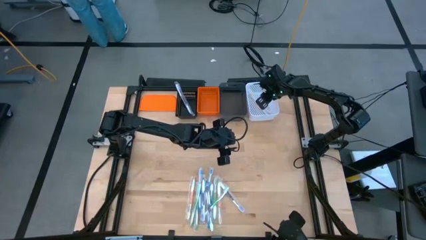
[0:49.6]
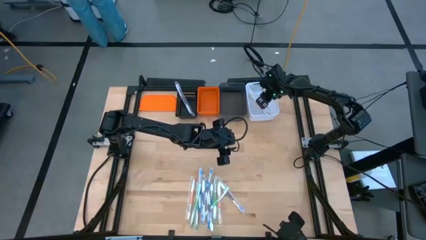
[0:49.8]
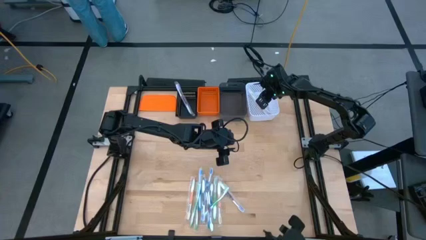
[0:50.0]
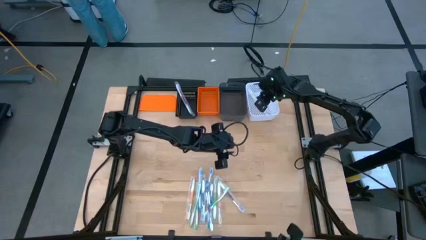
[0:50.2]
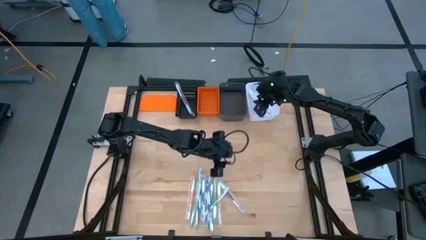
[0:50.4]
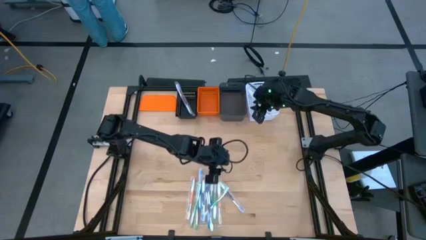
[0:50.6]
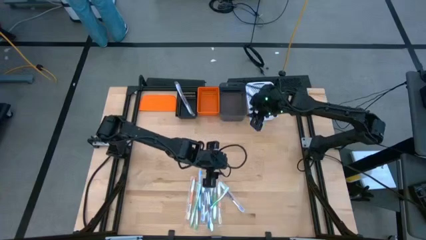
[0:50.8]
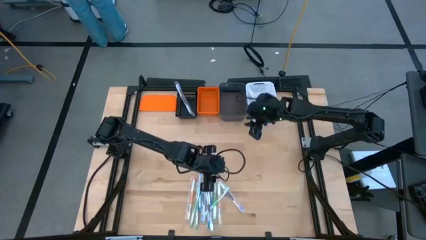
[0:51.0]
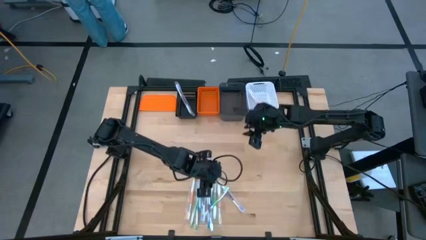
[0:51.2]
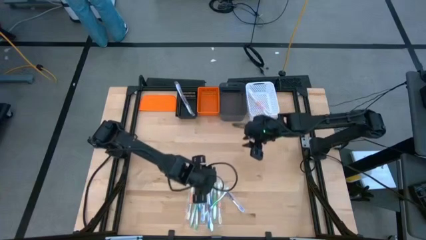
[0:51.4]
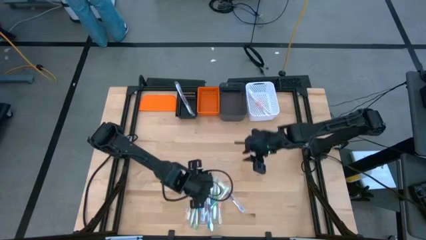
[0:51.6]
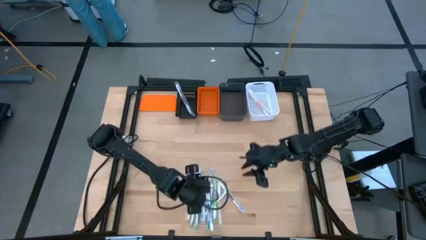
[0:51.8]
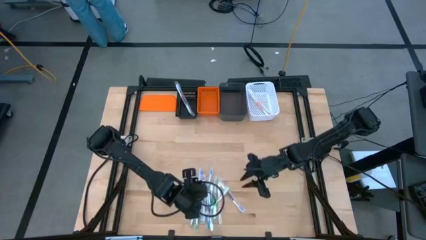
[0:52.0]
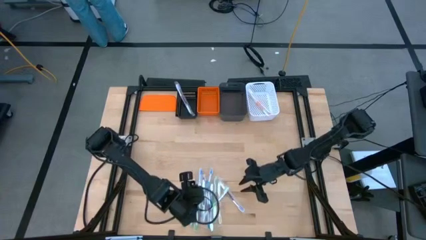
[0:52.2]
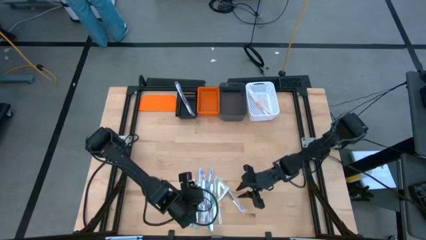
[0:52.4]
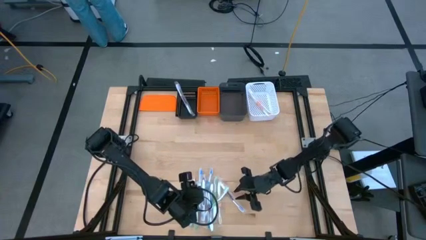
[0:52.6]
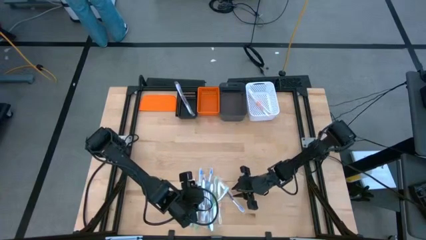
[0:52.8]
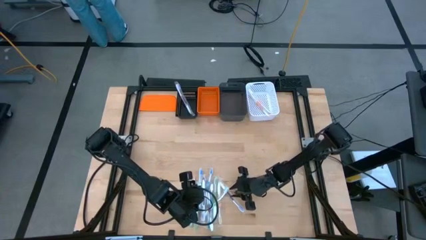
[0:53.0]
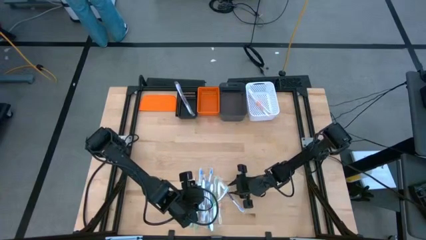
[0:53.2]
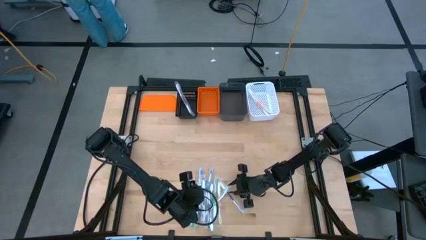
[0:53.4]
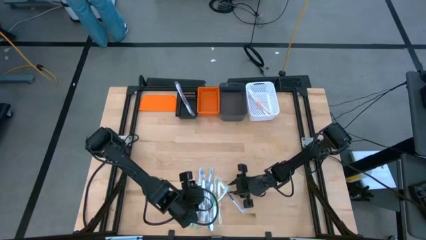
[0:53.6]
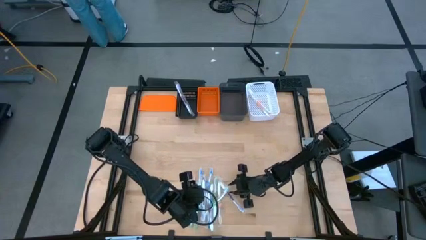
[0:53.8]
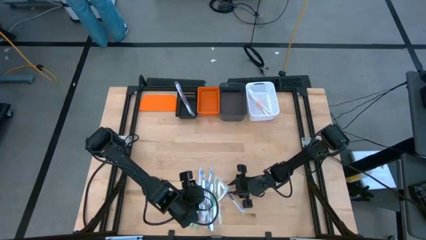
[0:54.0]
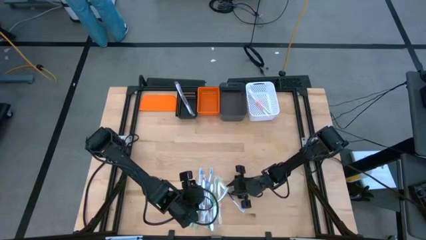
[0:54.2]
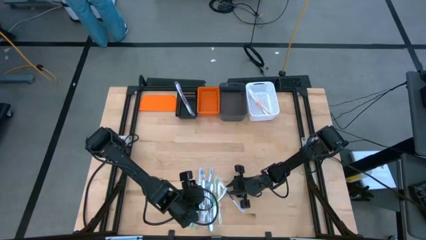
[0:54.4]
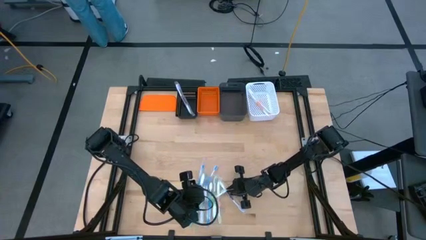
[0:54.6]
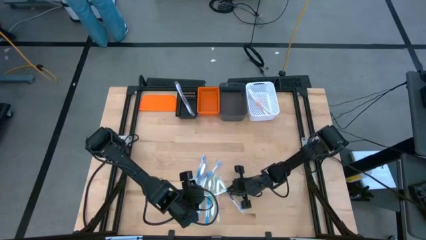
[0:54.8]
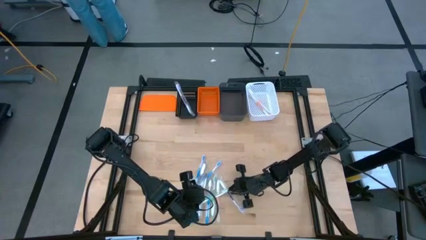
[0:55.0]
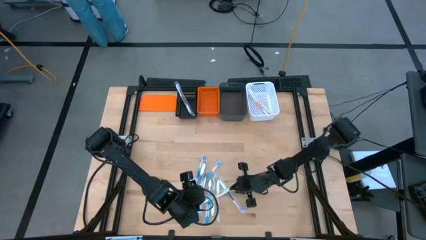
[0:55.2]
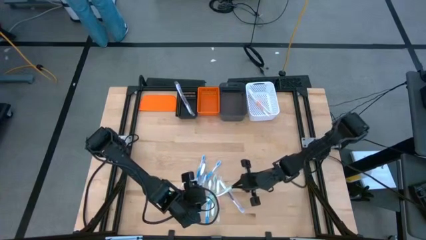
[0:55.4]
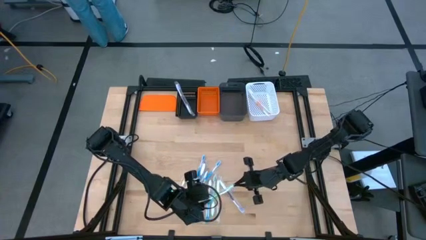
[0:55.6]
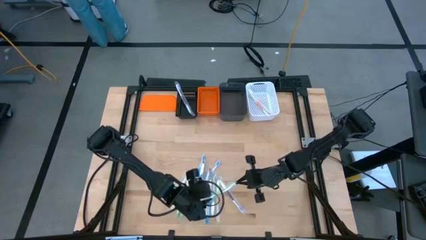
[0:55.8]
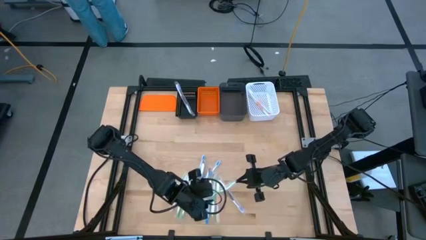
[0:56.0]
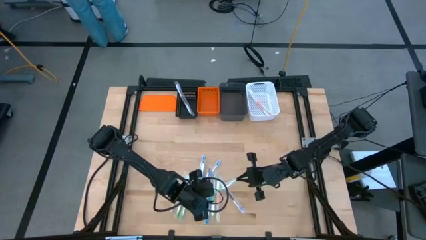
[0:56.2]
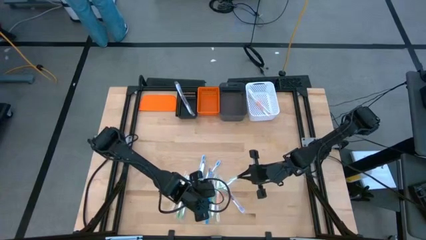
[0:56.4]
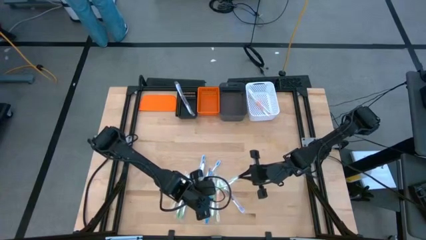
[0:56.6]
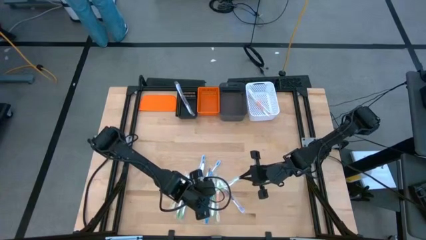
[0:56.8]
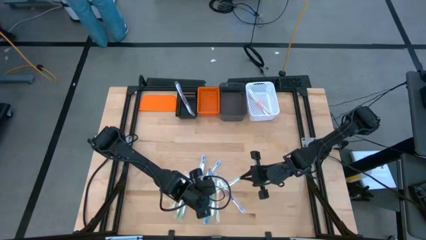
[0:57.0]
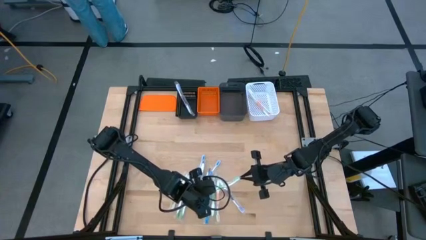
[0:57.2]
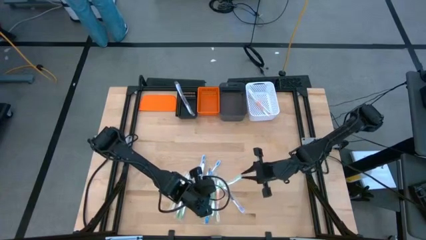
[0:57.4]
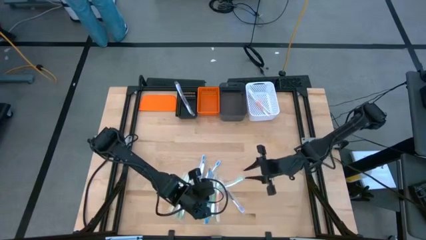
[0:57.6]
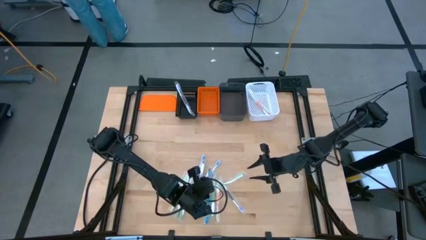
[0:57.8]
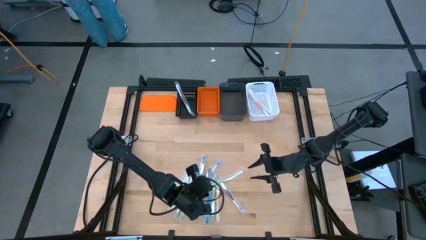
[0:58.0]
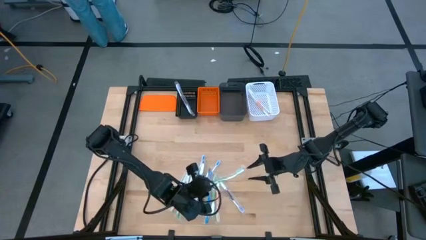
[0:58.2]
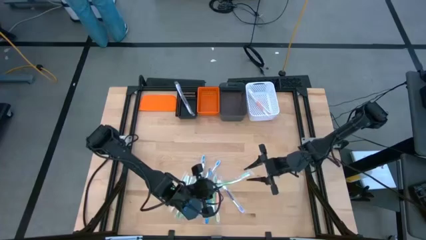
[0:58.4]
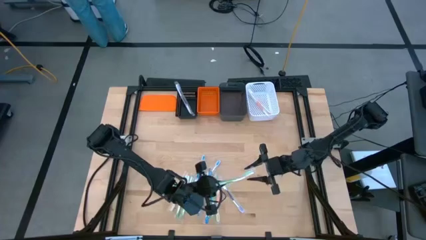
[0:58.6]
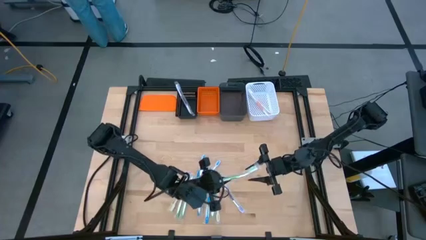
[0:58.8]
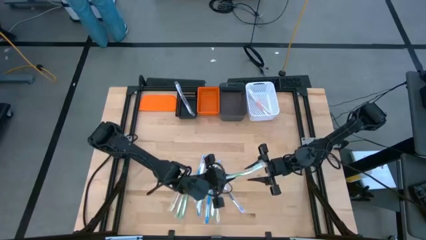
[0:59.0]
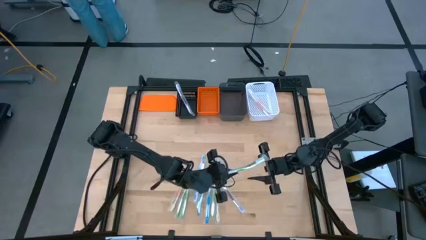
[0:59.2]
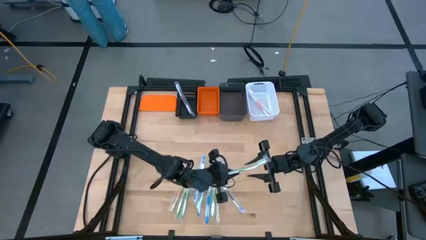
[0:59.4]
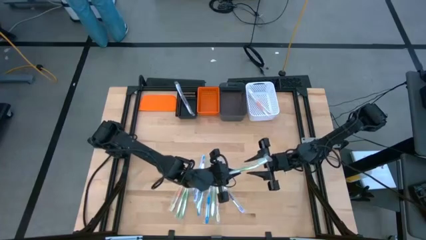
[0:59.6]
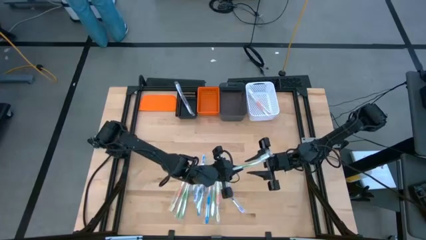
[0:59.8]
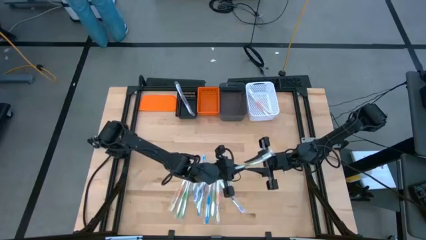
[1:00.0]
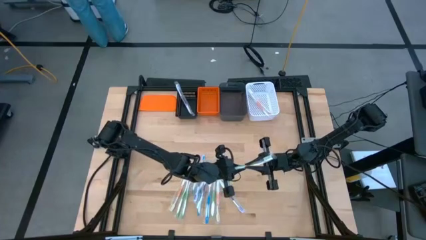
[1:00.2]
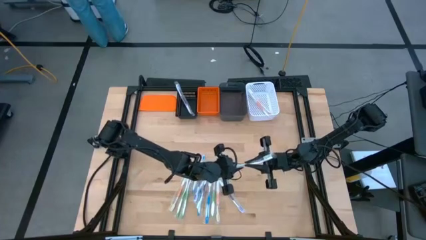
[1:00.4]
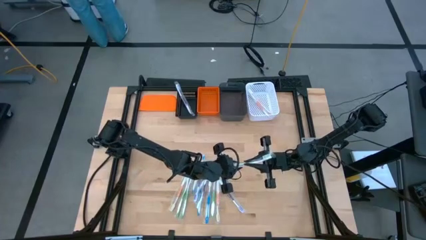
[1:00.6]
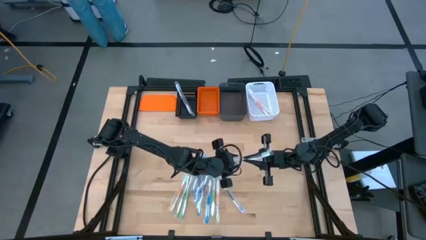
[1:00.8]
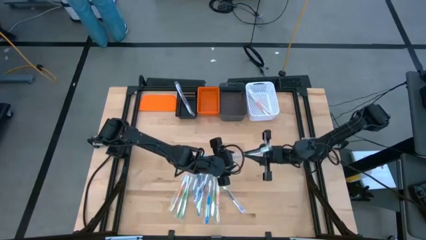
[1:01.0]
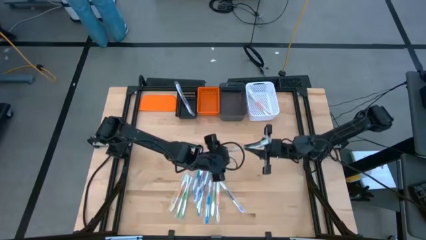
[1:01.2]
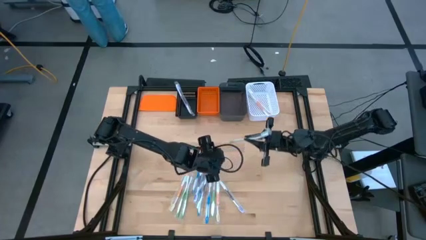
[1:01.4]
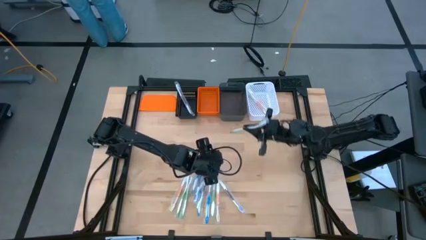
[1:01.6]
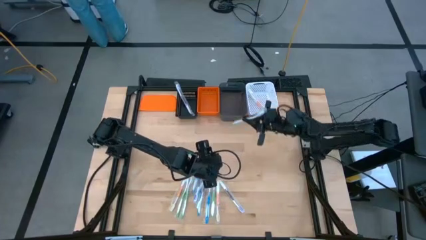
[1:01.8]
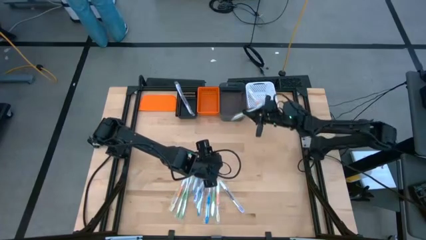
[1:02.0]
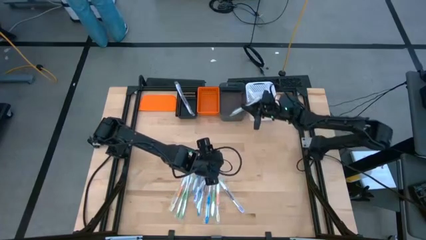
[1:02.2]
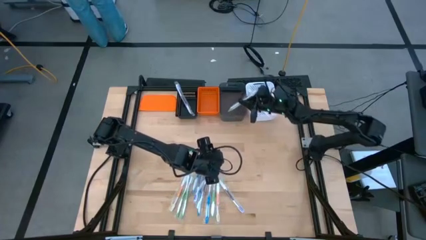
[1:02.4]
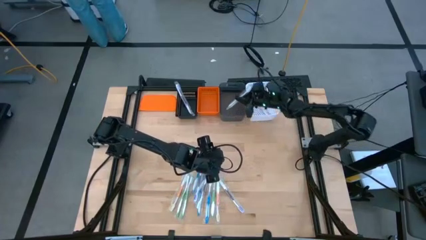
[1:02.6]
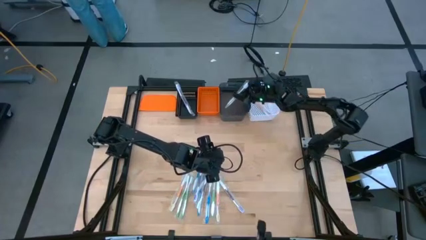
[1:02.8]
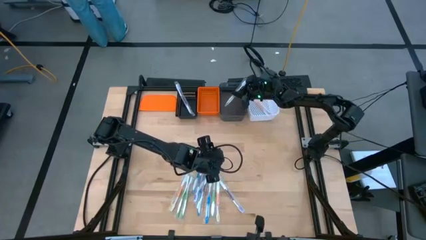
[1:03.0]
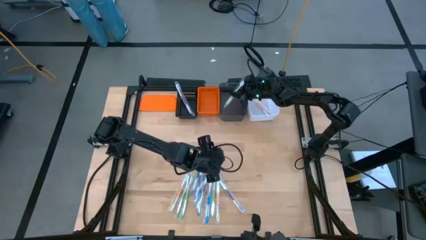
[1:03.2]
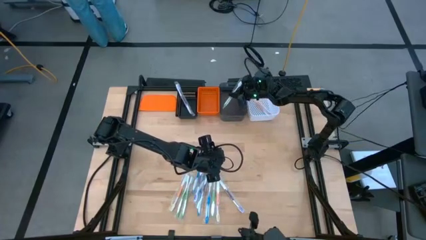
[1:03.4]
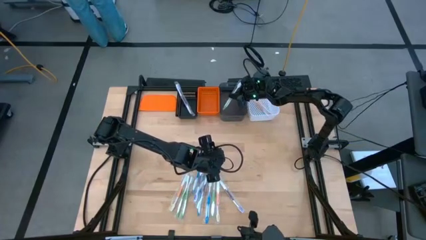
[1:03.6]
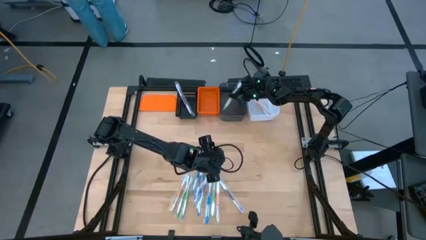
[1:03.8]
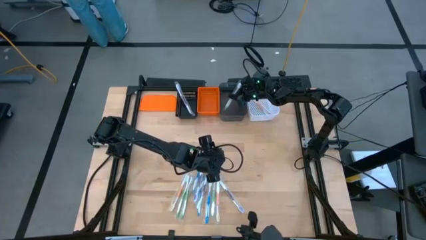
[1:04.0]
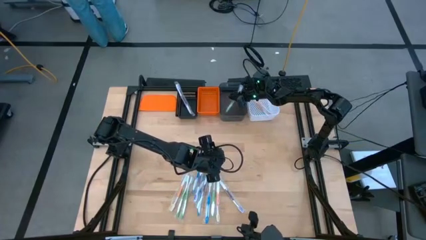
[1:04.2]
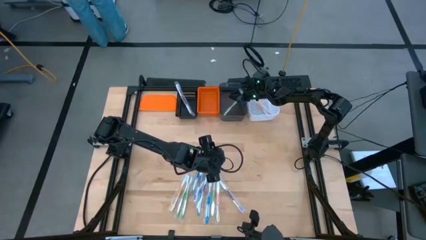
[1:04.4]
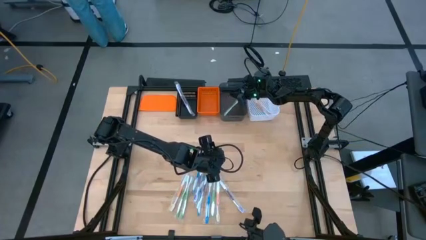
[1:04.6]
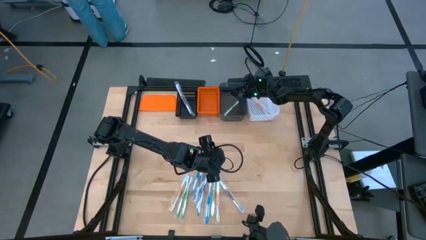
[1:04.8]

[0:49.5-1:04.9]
Task: Pick & Place Toothbrushes
Put the green toothbrush into the black bin

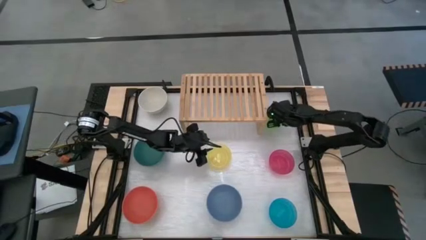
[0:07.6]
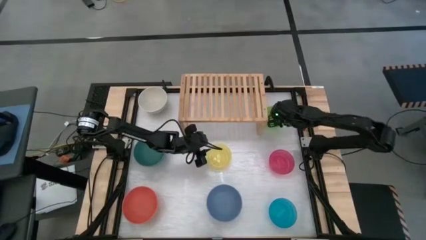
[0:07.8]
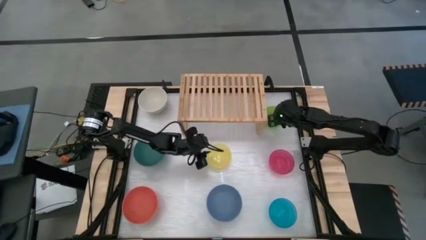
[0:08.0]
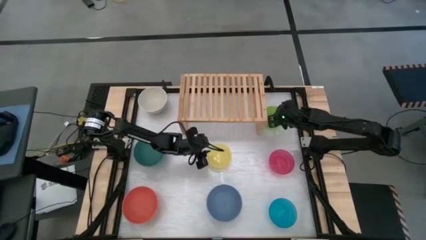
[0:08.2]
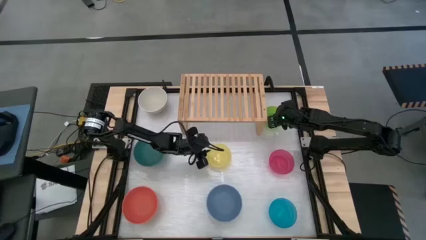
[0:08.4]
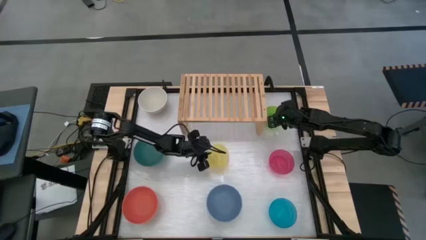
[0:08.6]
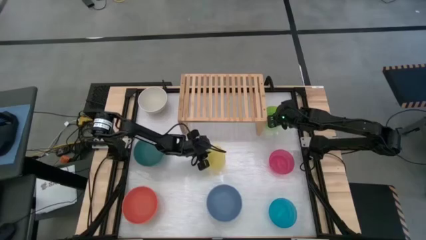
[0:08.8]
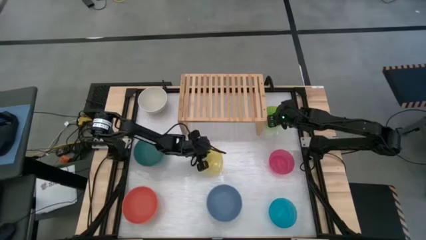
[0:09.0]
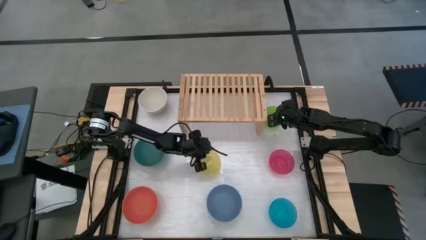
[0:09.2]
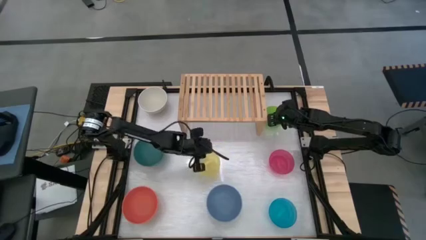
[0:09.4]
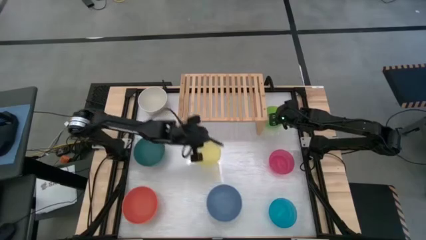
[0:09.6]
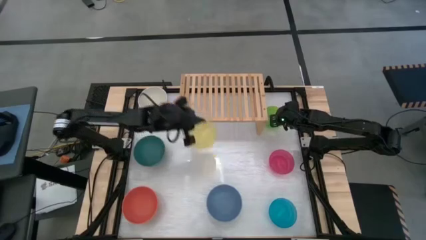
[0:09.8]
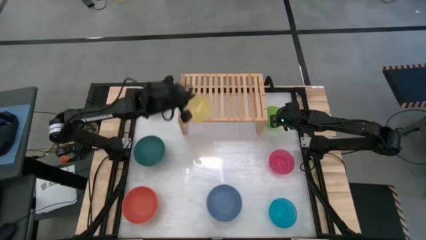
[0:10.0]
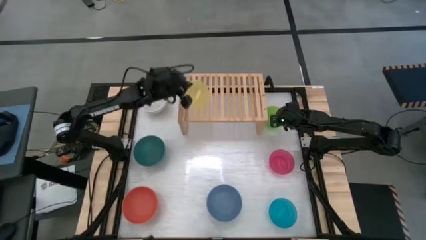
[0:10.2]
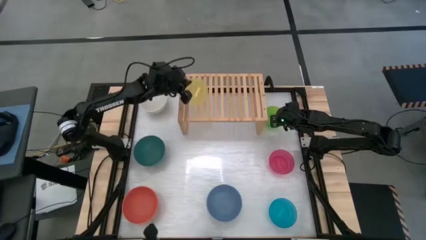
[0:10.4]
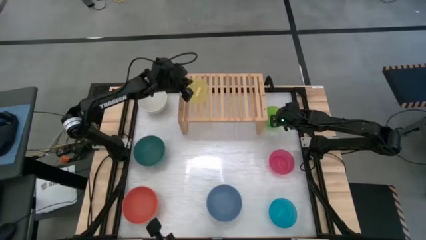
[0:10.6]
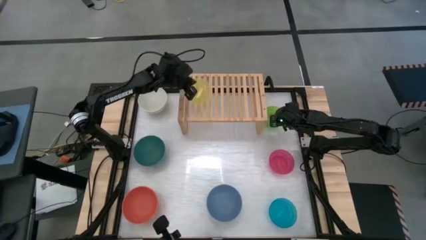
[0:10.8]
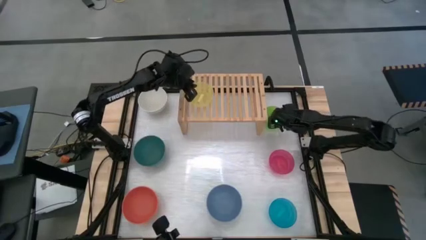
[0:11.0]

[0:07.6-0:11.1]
Task: Place and stack bowls onto a shelf
Put the small yellow bowl on the shelf
